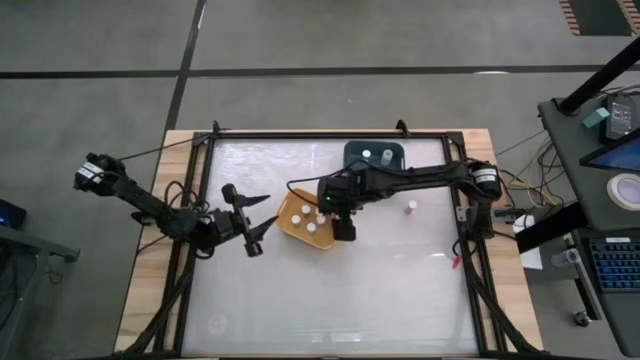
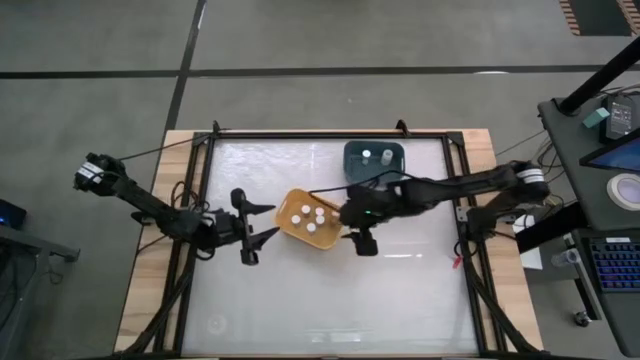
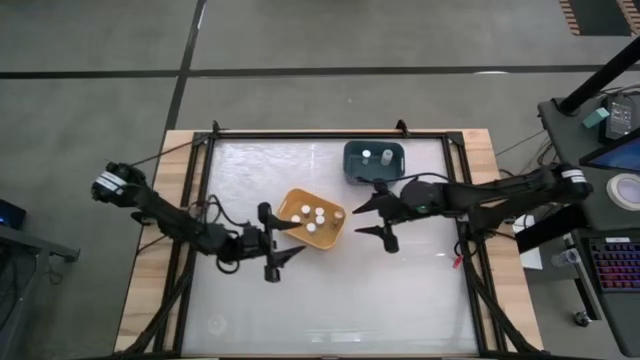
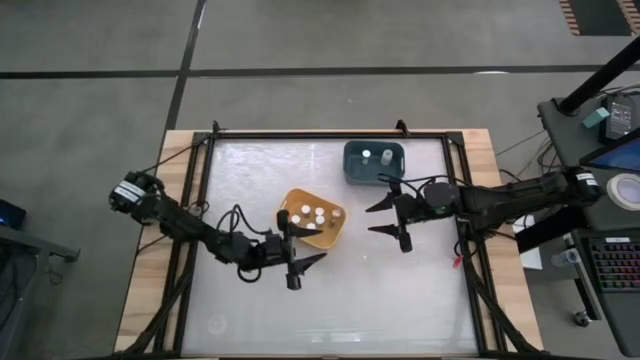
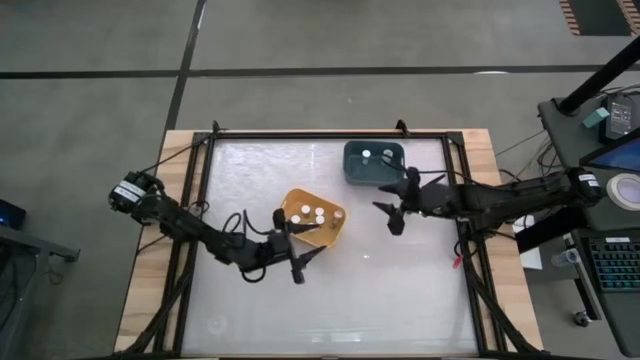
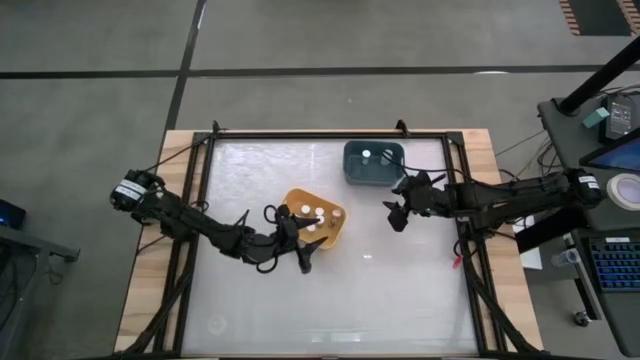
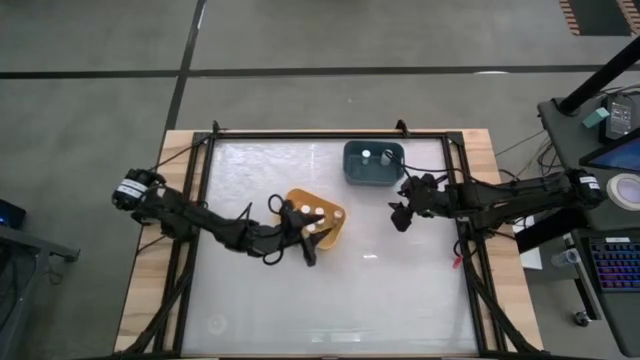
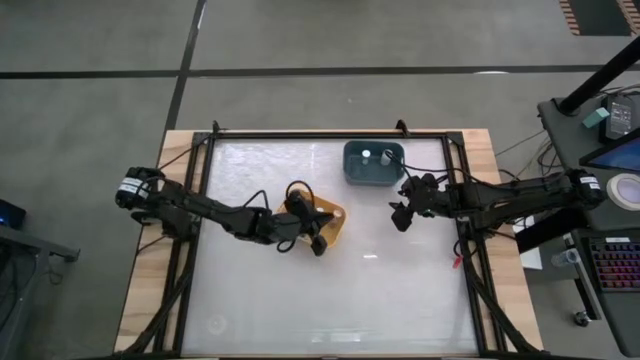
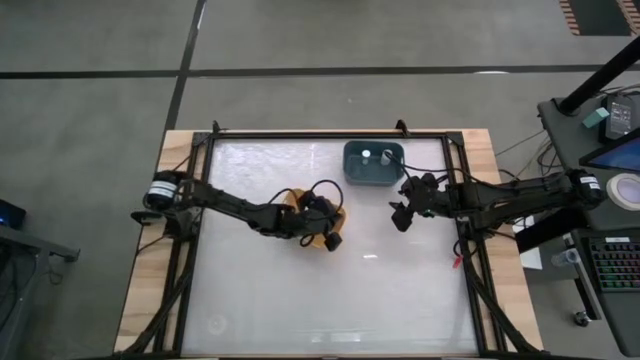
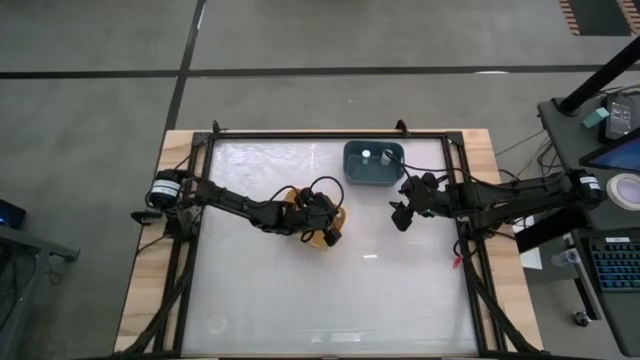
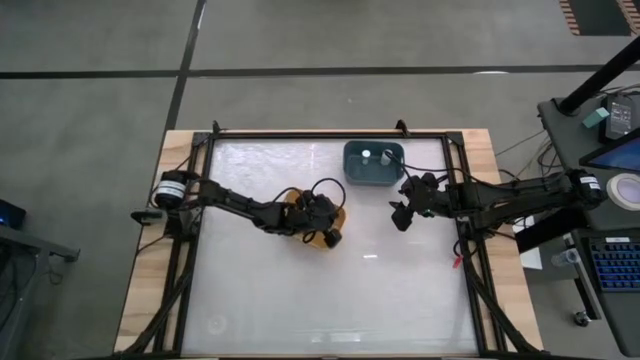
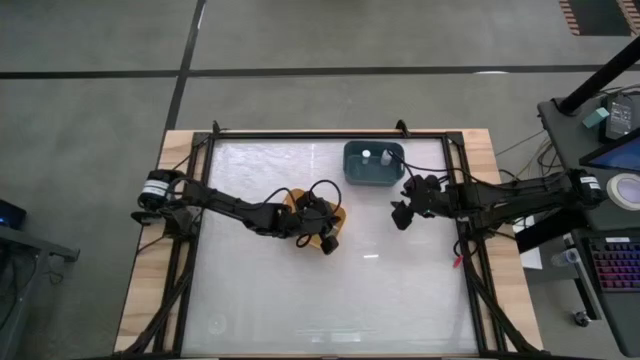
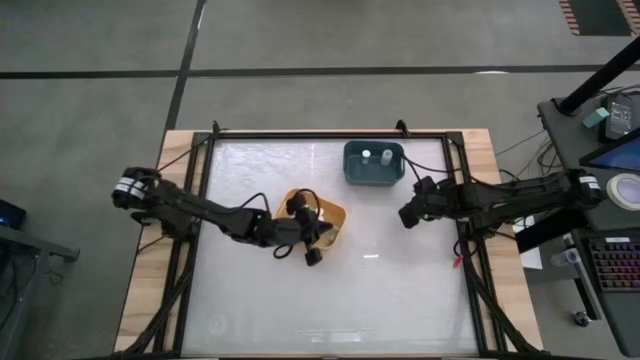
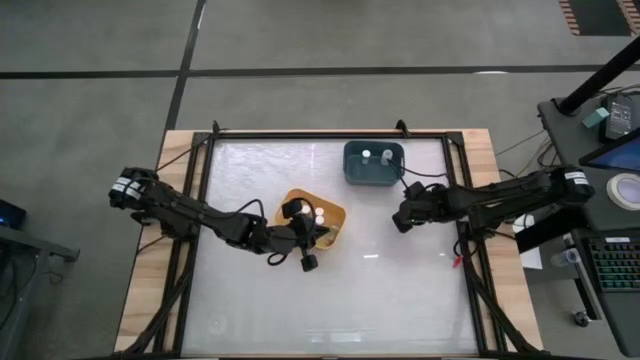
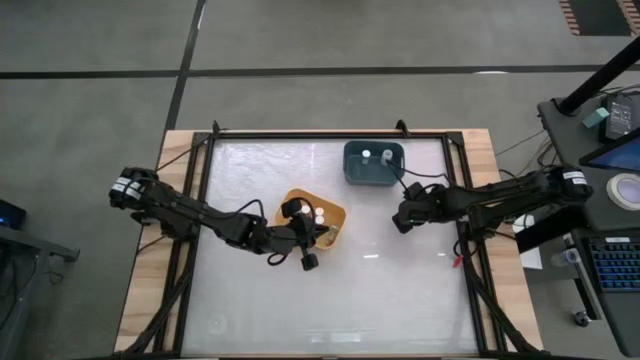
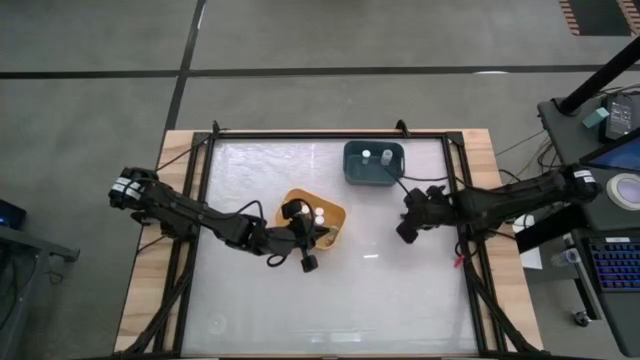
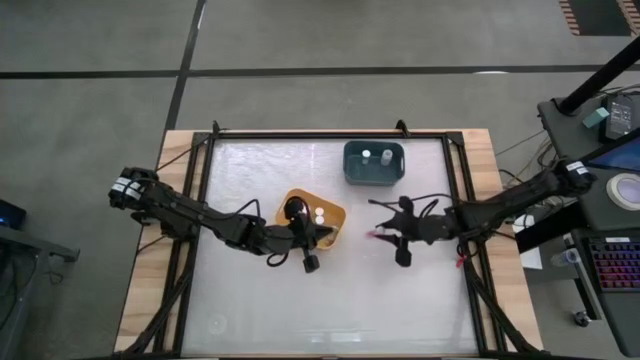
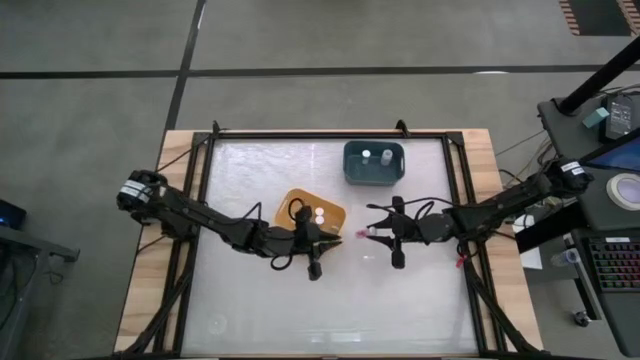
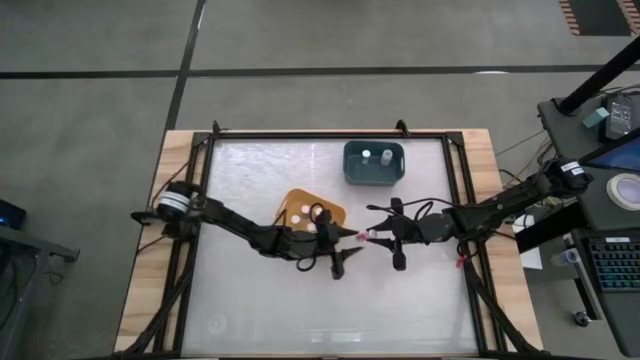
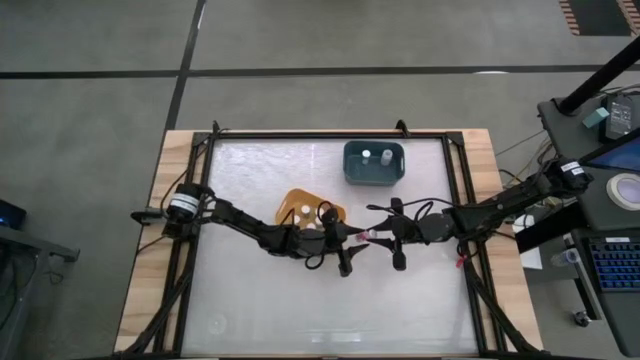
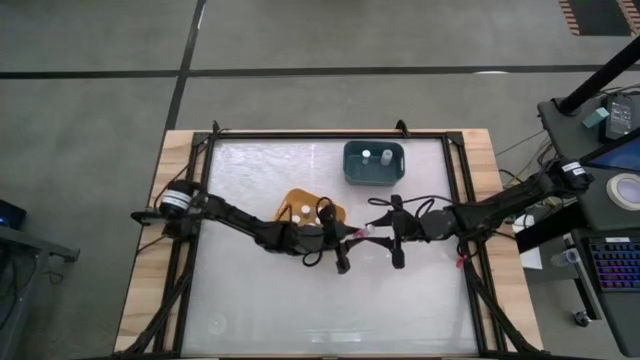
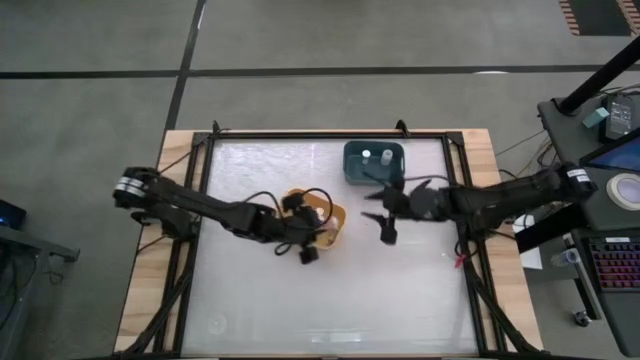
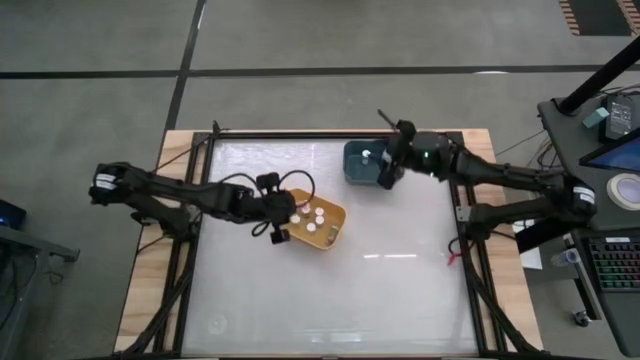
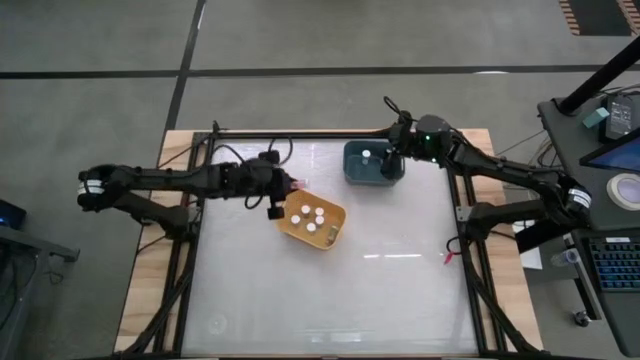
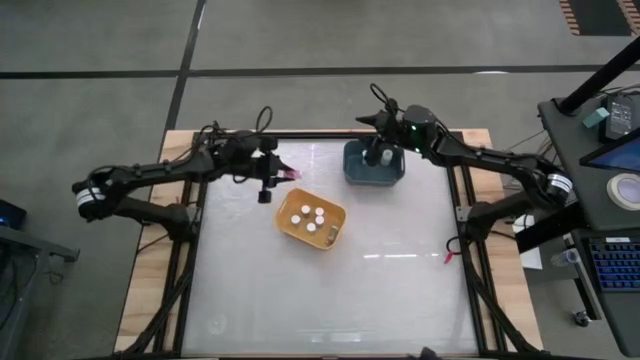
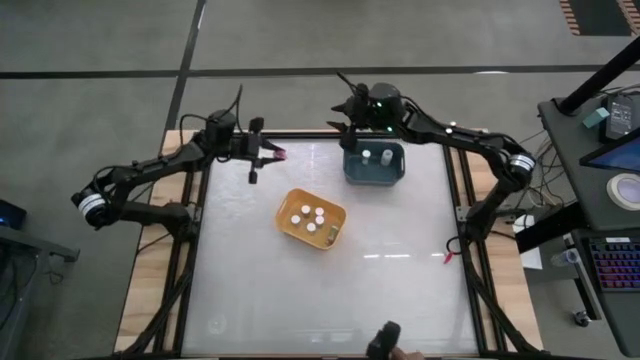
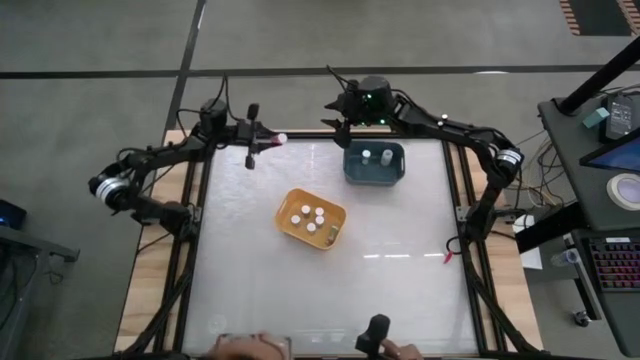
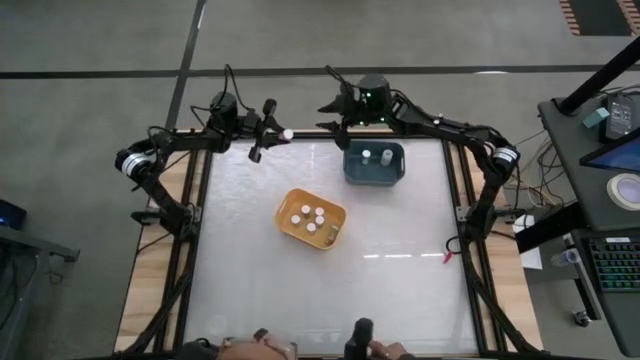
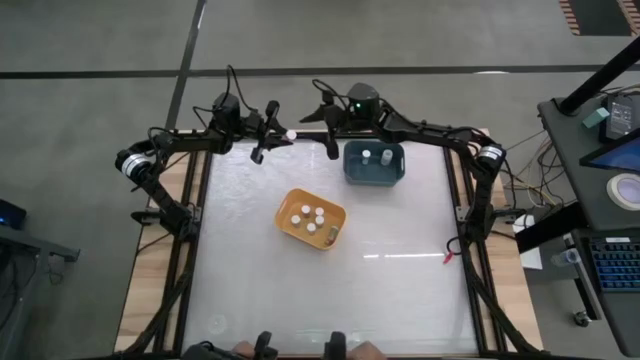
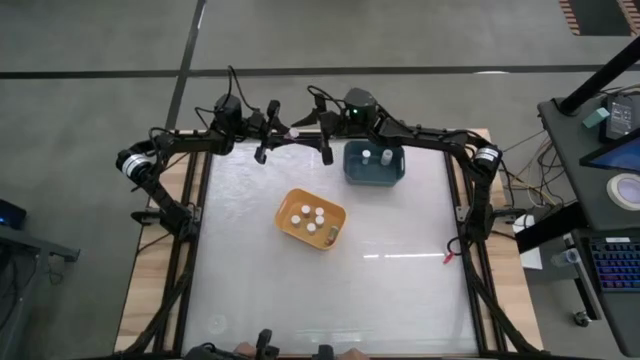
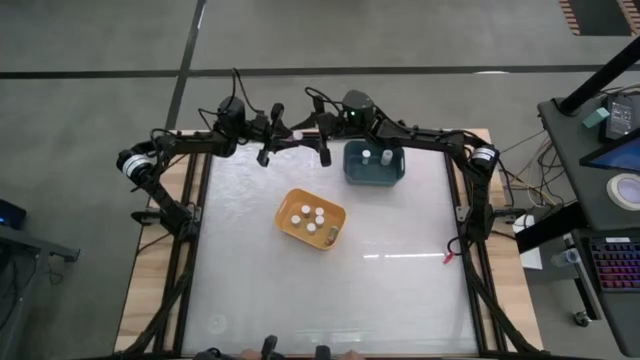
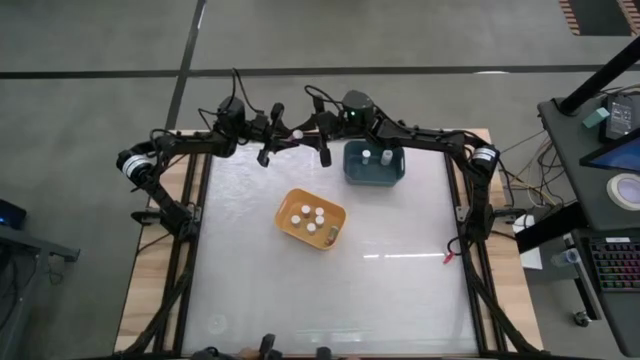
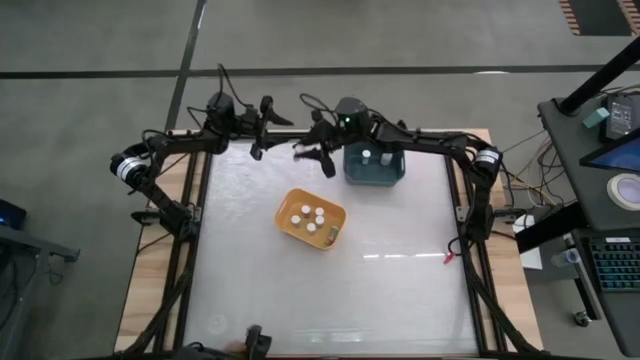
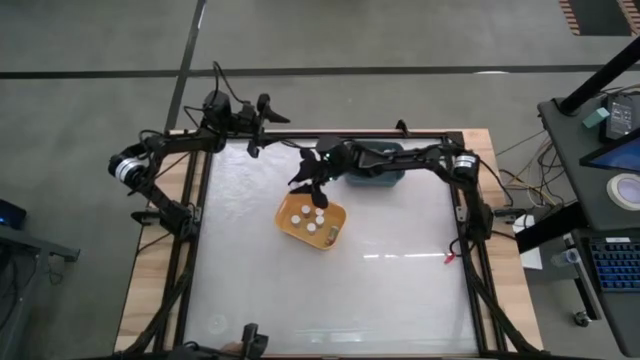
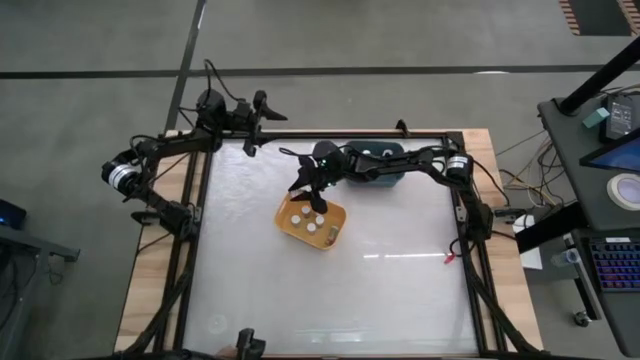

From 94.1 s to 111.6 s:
Task: Pick and place medicine bottles into bin by pill shape (circle, oval)
Put the pink pill bottle into the yellow bin

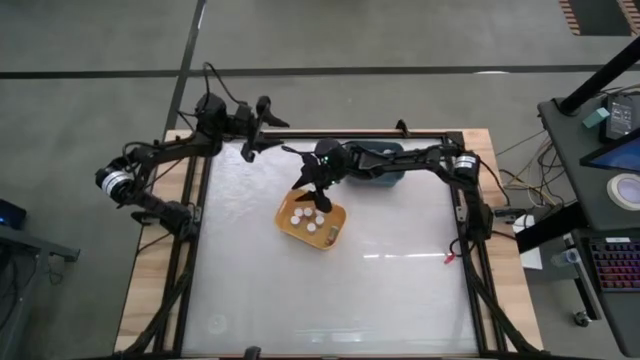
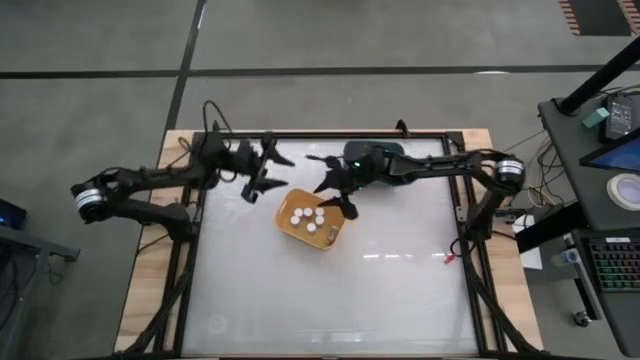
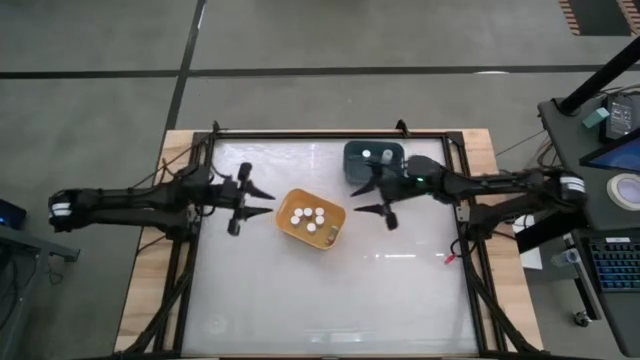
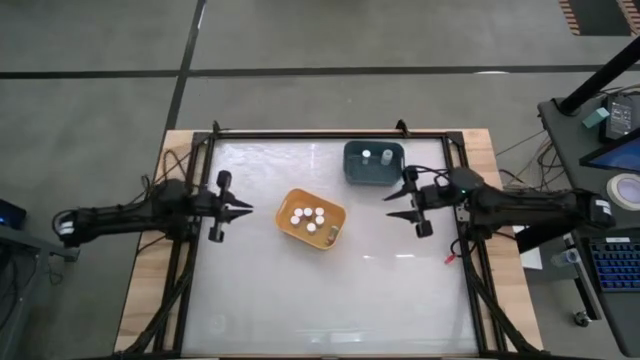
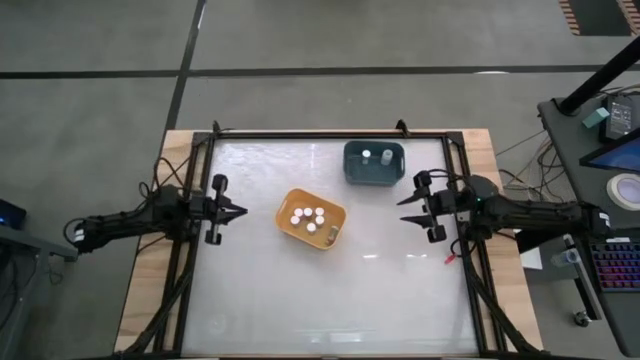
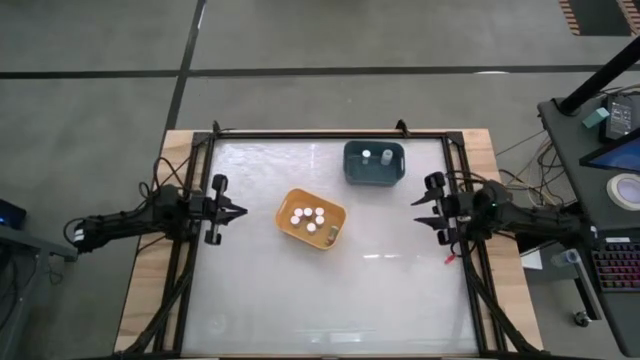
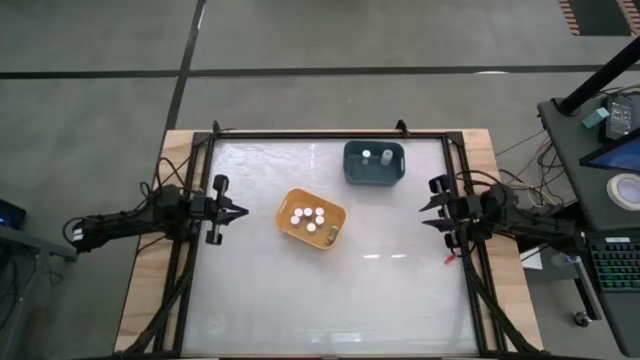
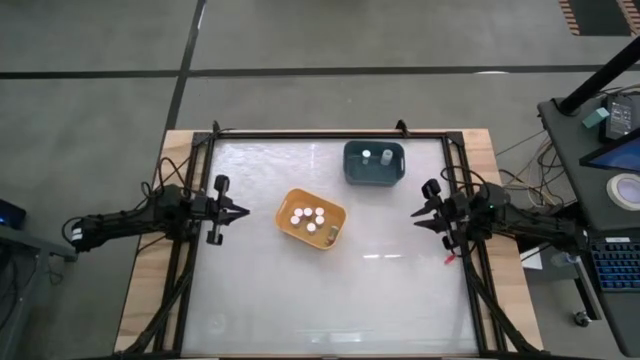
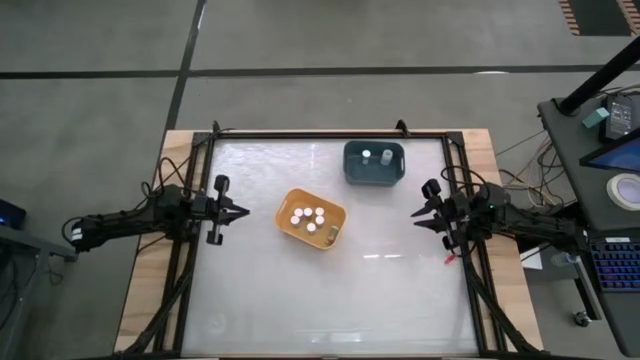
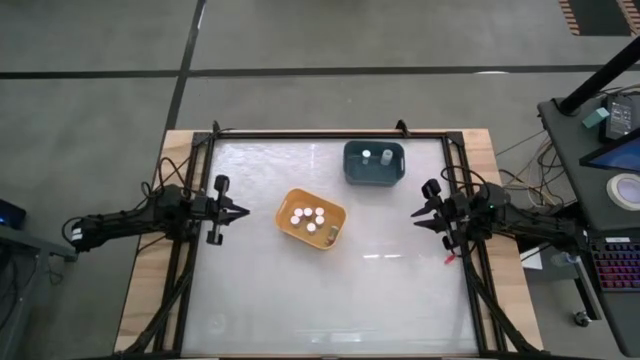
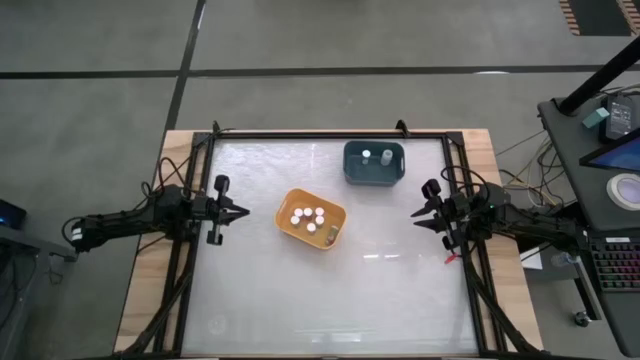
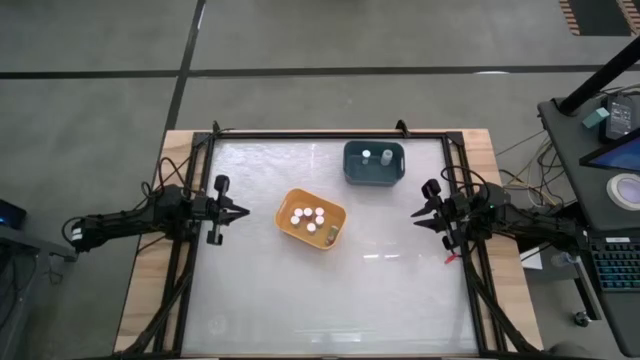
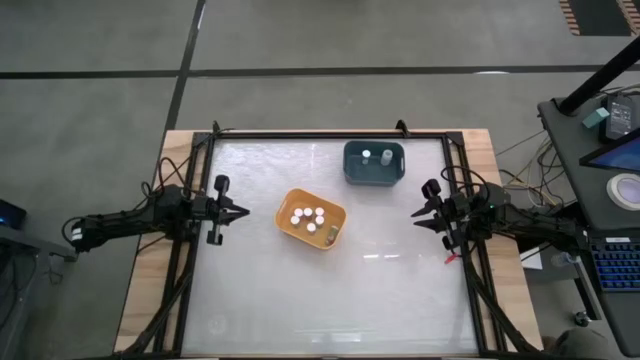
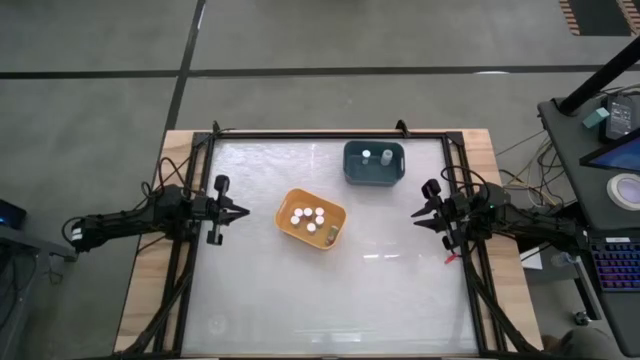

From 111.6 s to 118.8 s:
Return to Home Position
